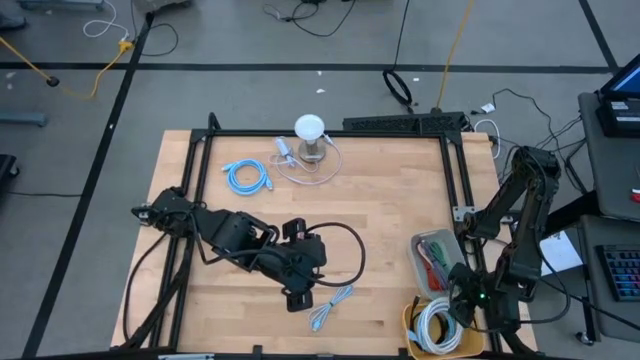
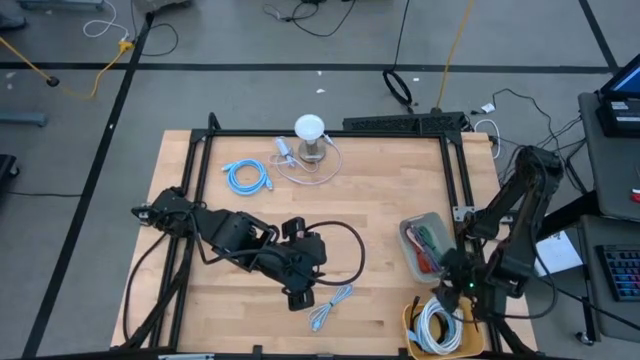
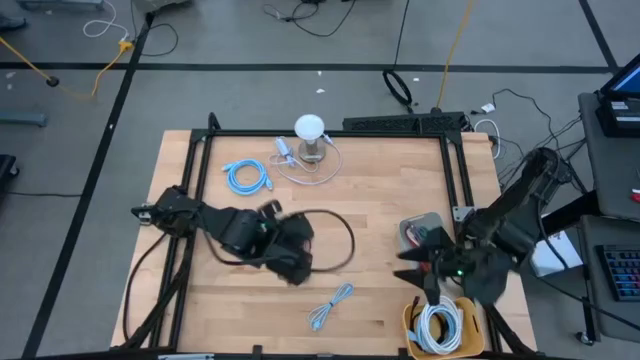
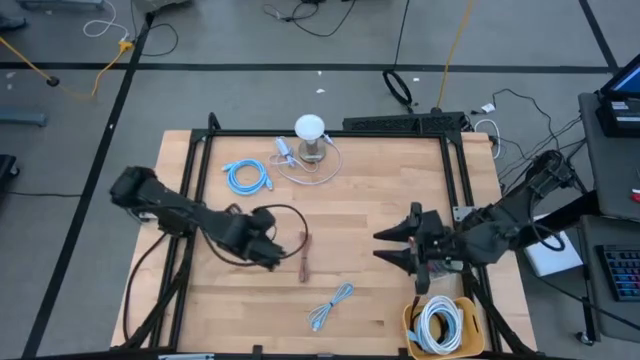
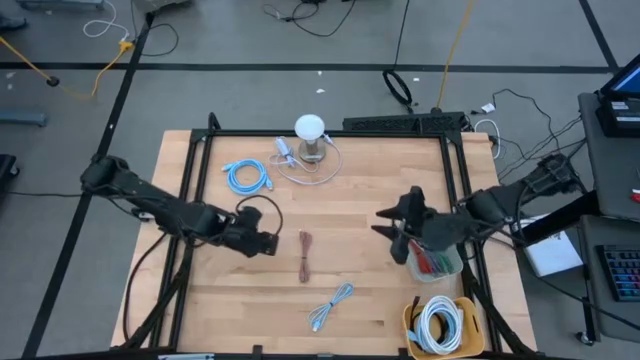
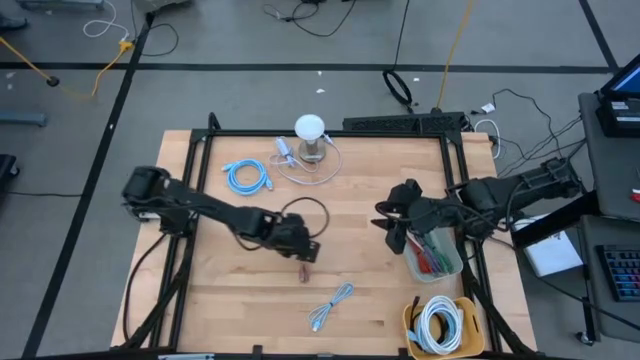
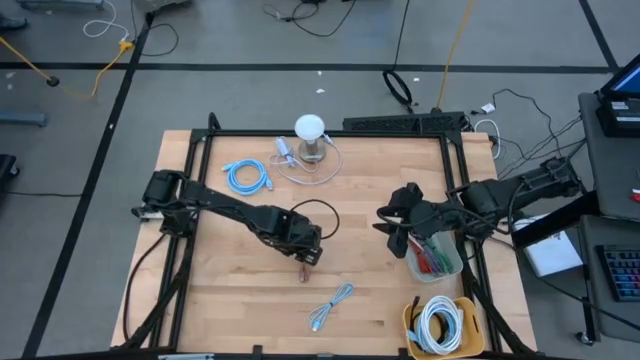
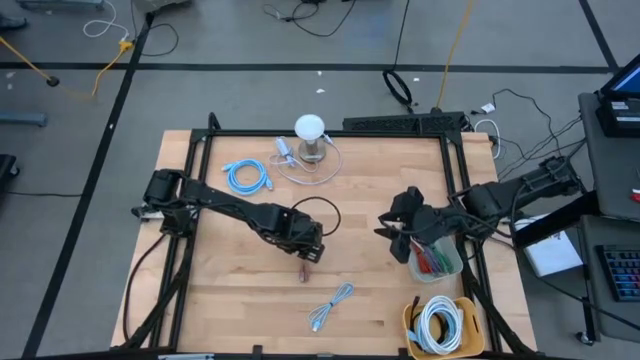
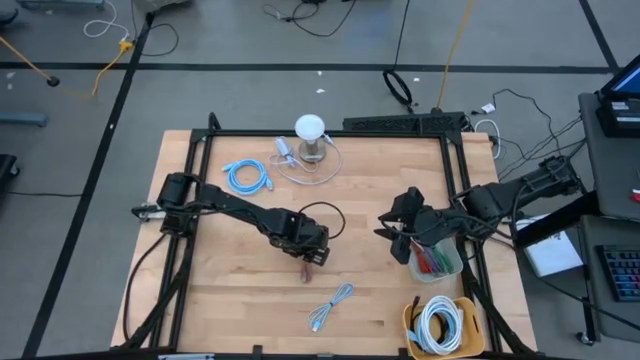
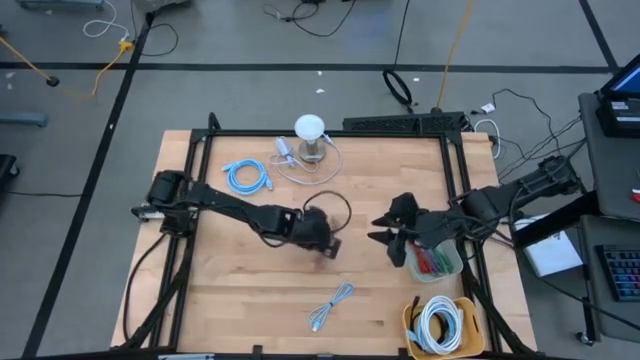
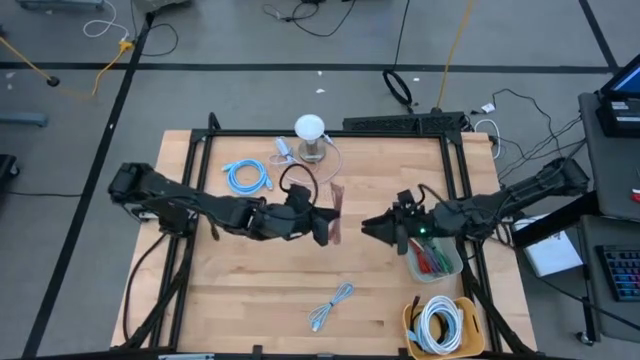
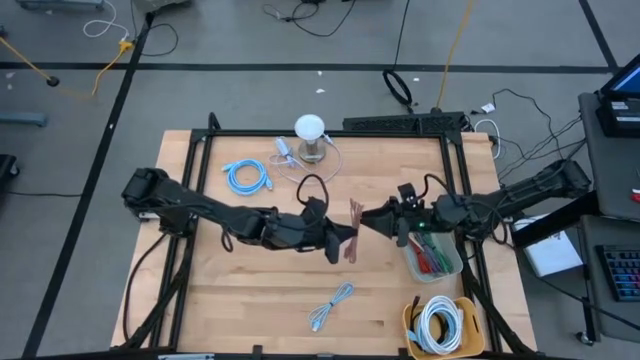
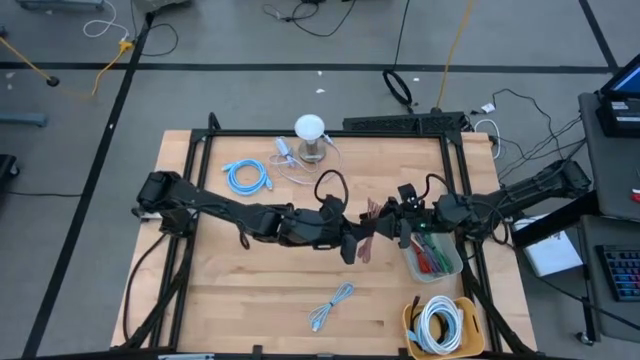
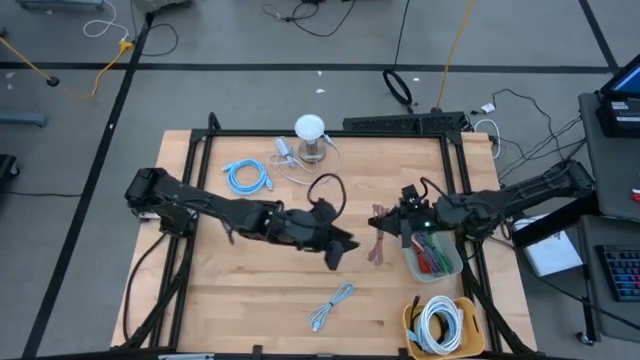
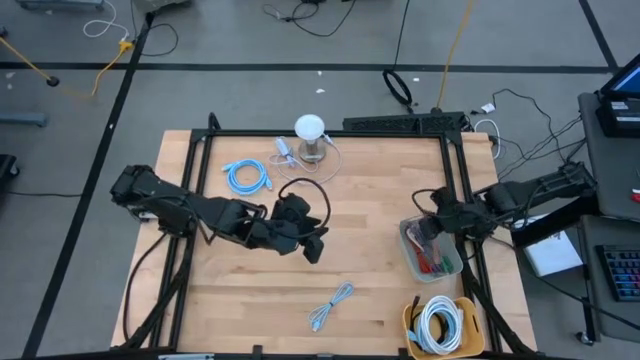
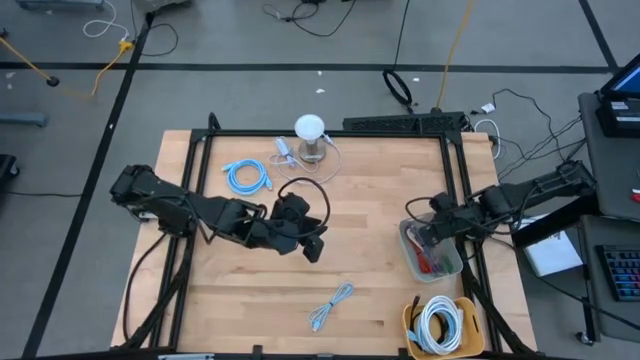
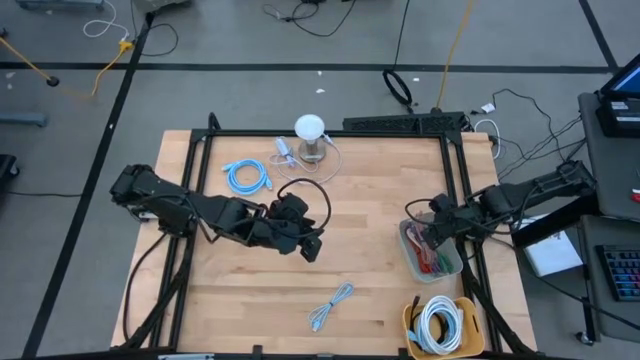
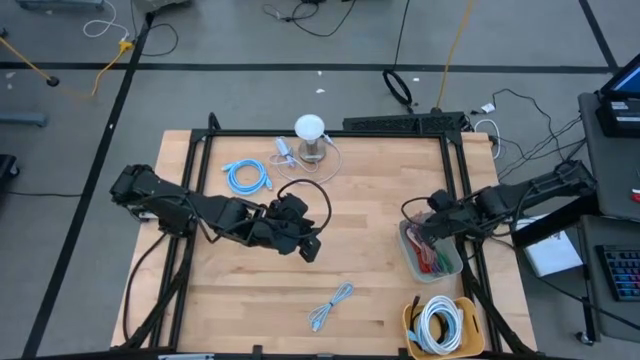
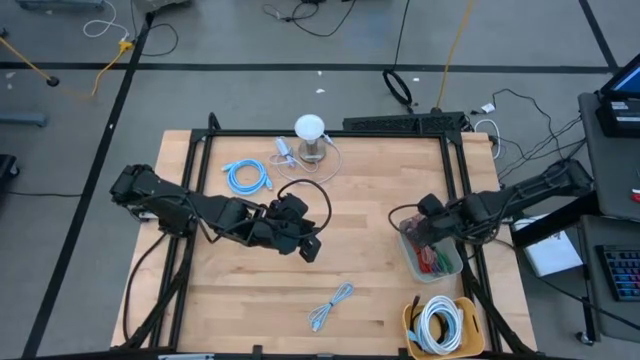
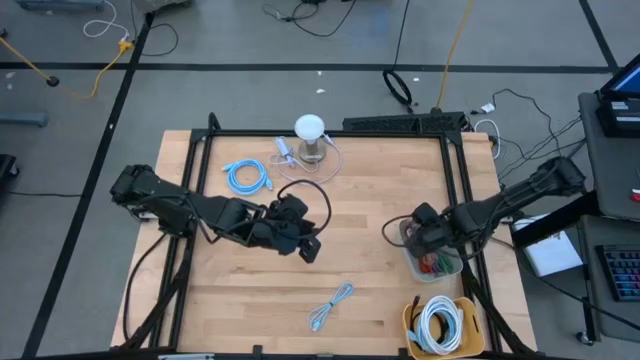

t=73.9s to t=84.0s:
Task: Pick & Place USB Port
Put the pink USB cable into the gray bin

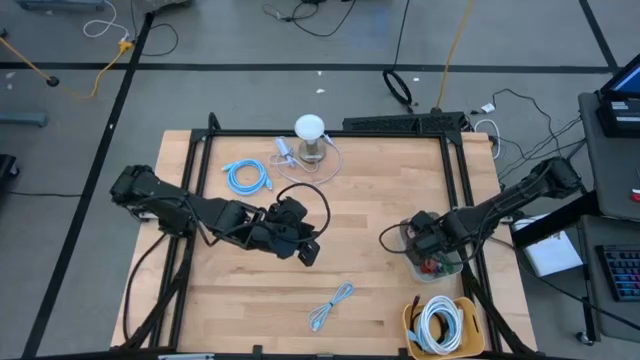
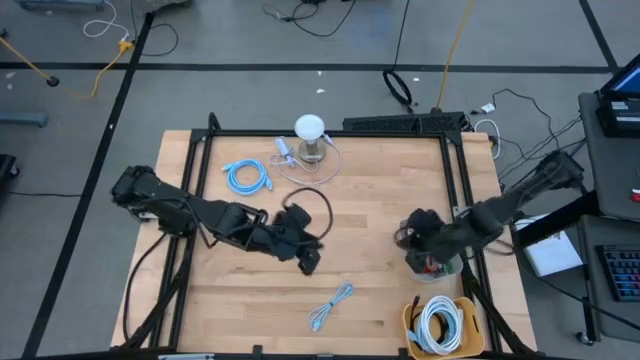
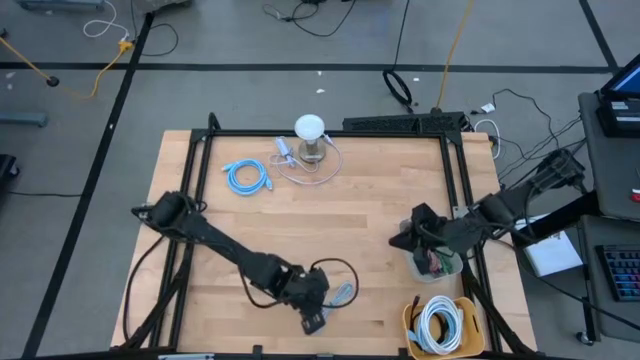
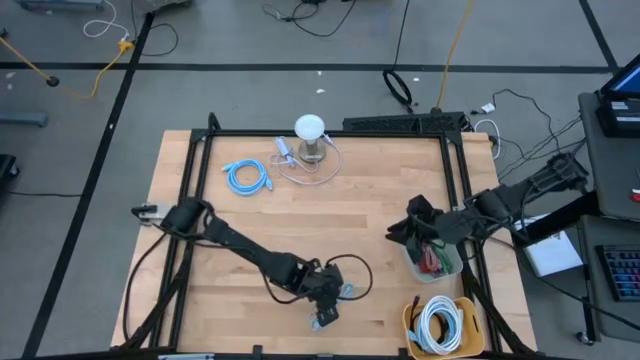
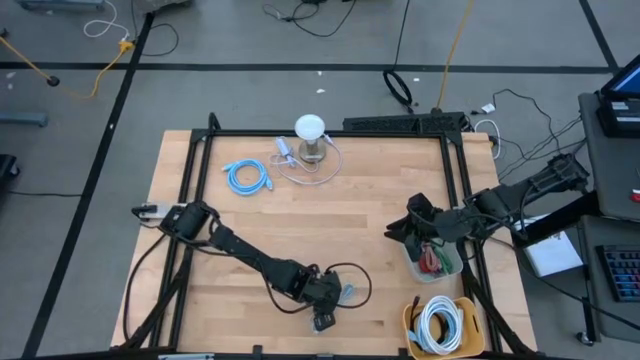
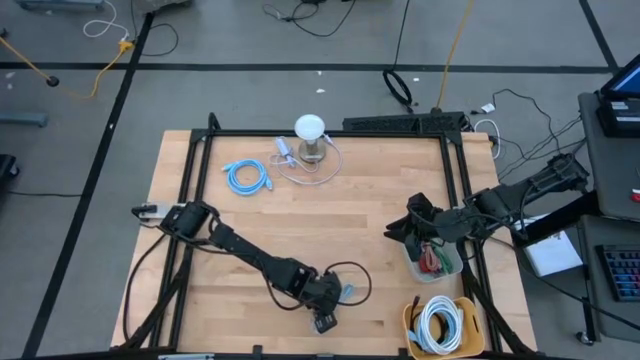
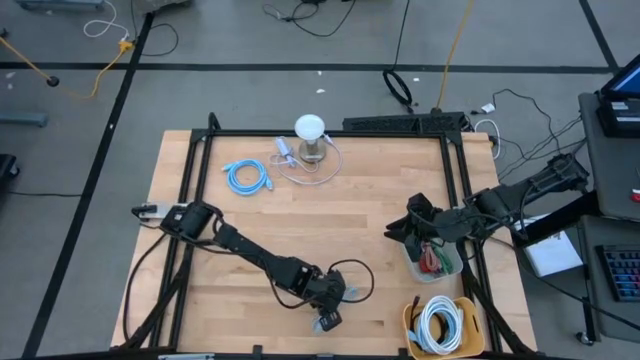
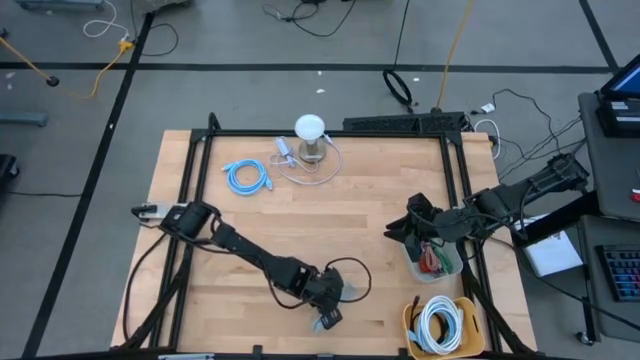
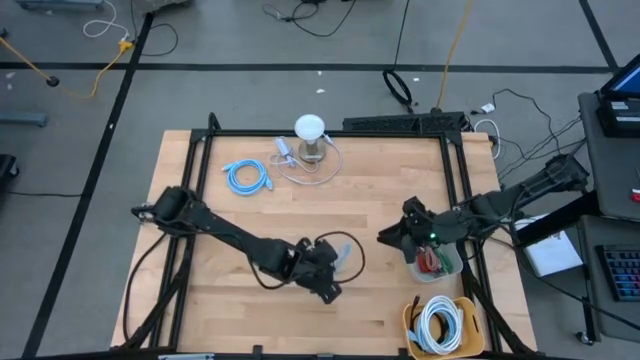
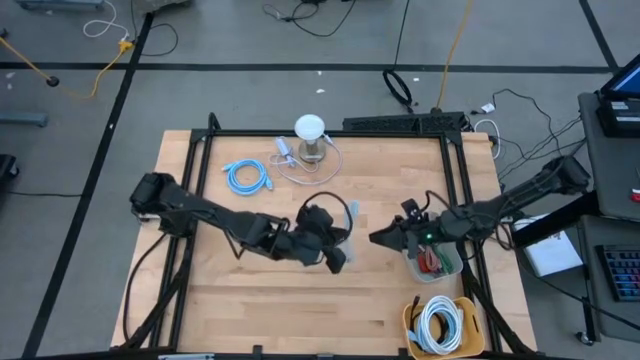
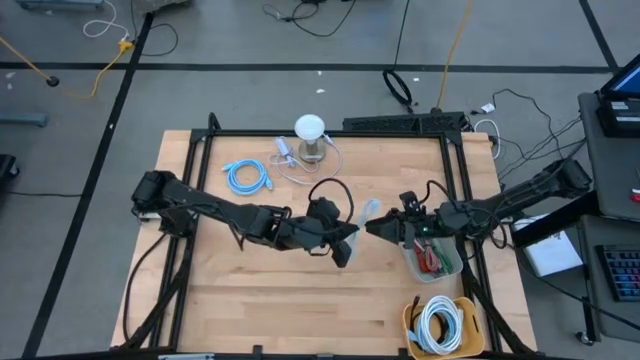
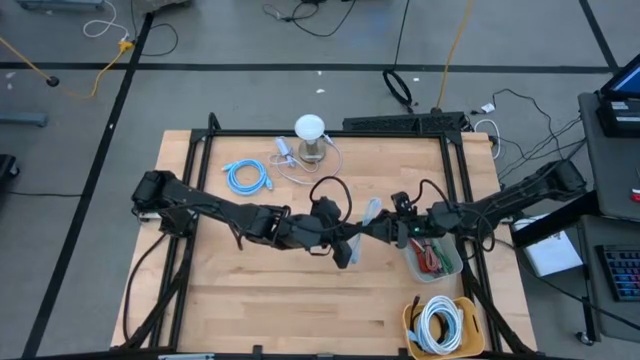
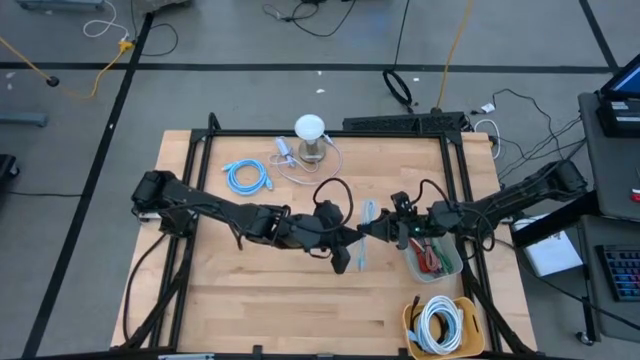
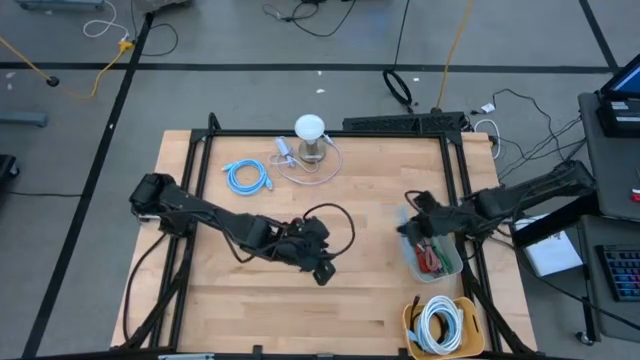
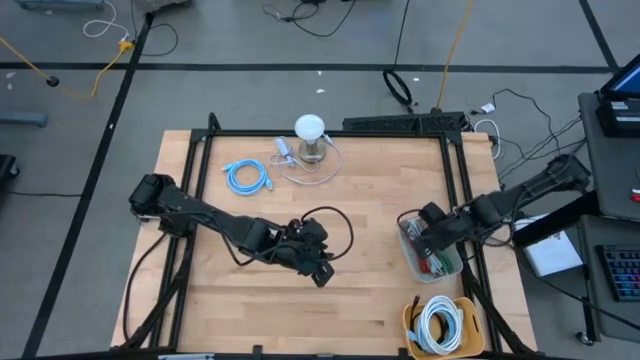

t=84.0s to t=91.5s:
Put the blue USB cable into the gray bin

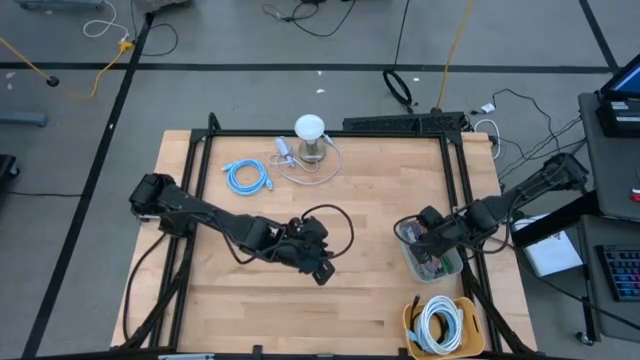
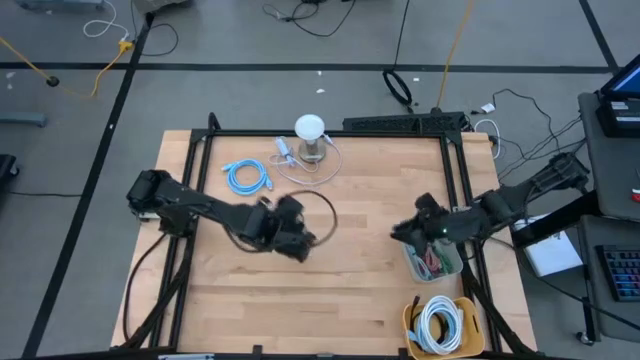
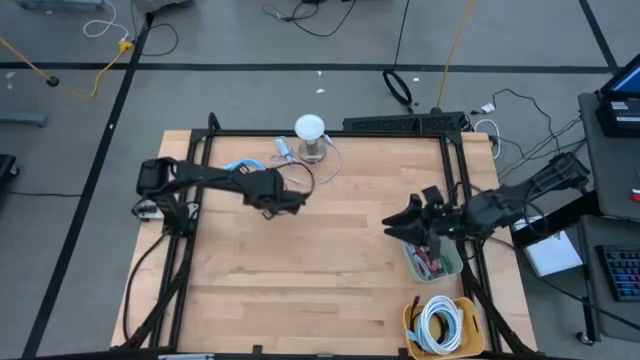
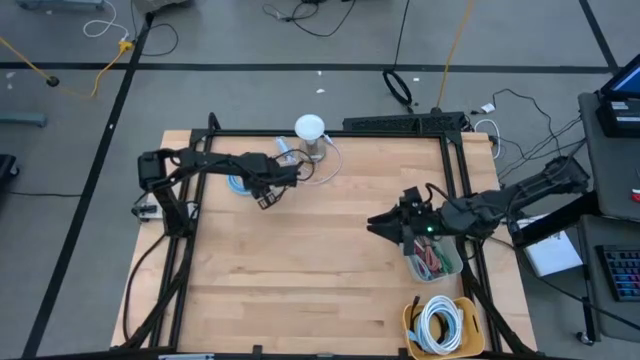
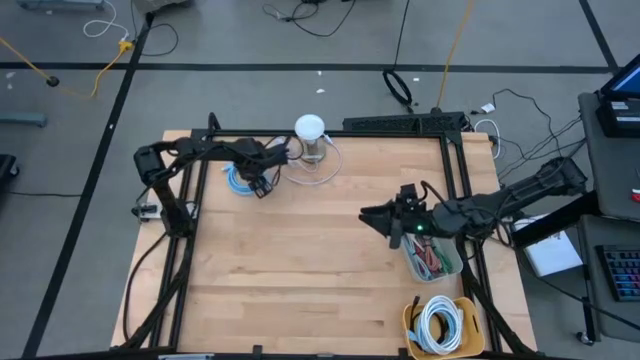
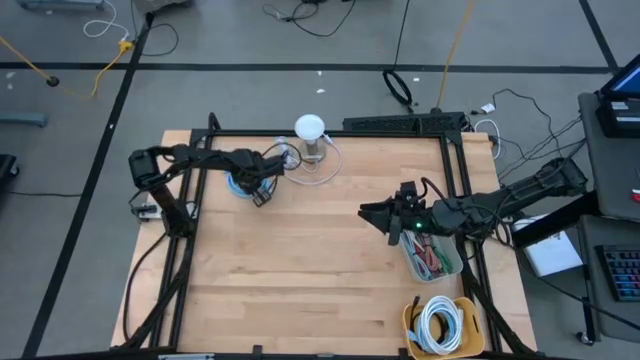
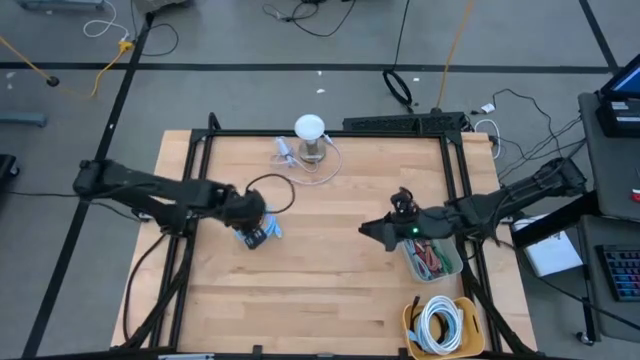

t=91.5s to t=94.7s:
Put the blue HDMI cable into the yellow bin
